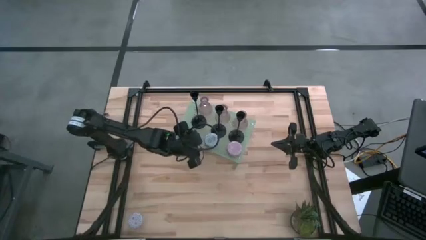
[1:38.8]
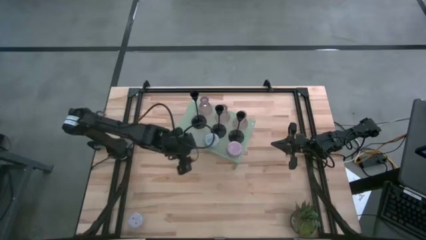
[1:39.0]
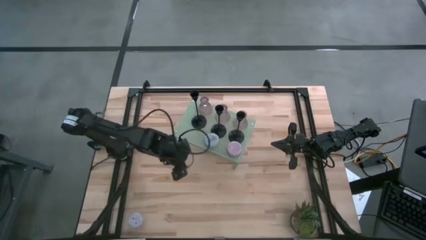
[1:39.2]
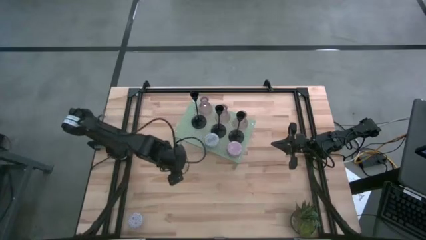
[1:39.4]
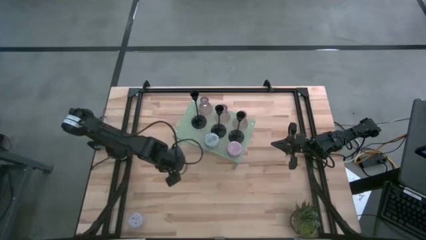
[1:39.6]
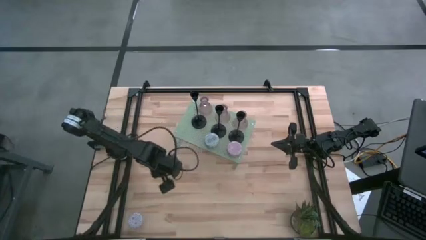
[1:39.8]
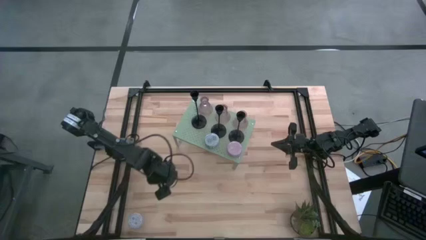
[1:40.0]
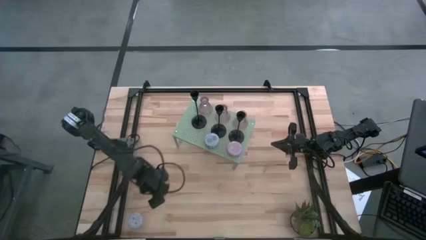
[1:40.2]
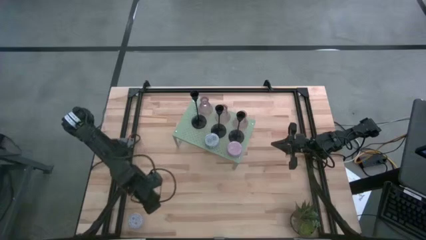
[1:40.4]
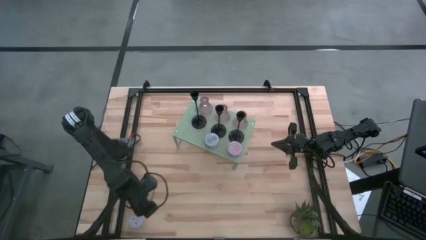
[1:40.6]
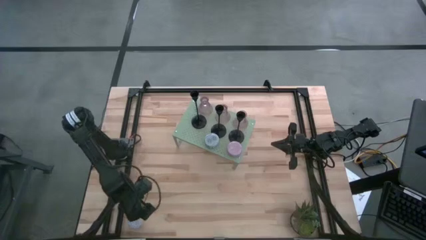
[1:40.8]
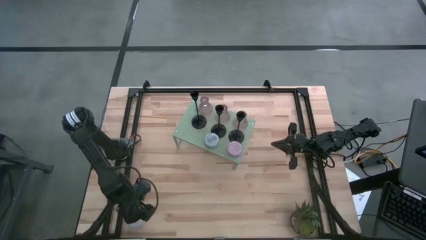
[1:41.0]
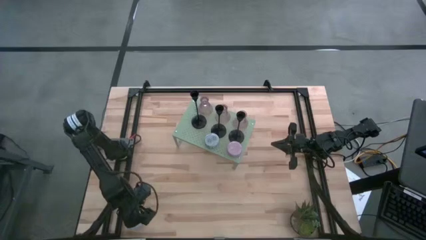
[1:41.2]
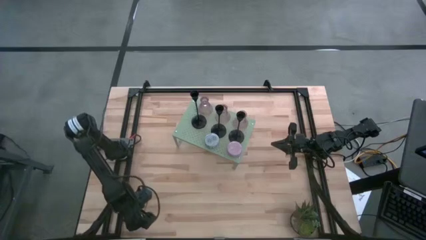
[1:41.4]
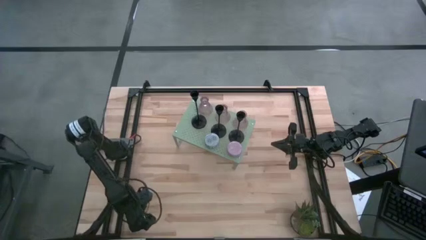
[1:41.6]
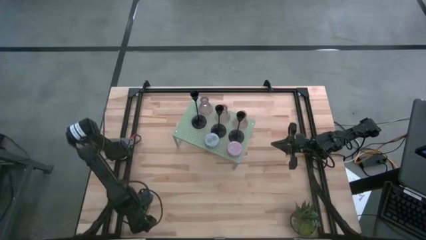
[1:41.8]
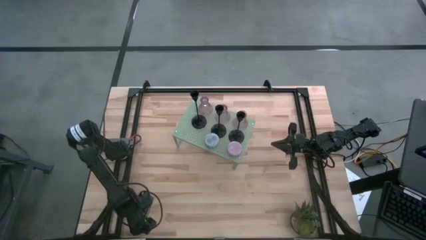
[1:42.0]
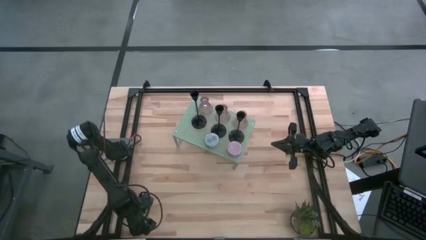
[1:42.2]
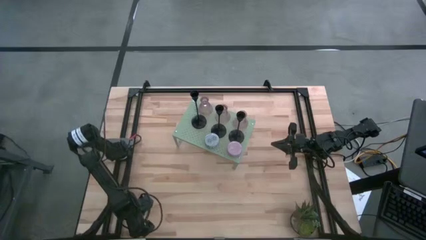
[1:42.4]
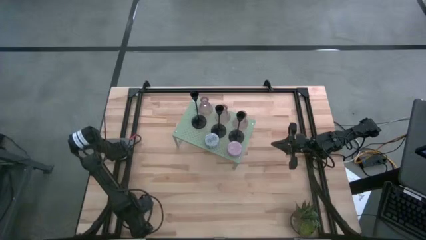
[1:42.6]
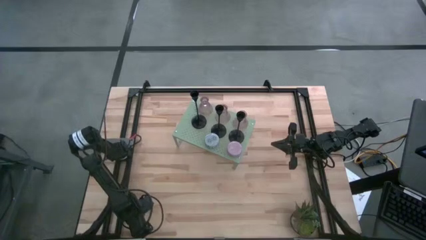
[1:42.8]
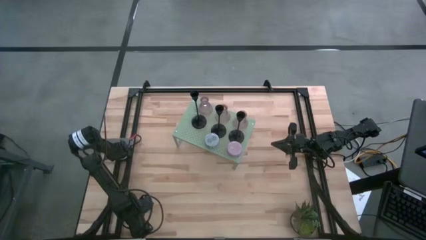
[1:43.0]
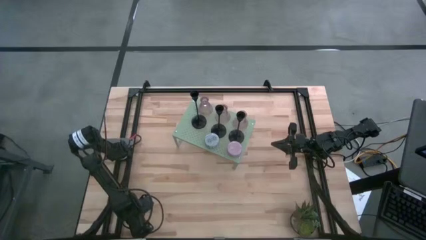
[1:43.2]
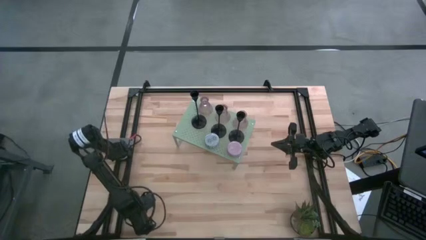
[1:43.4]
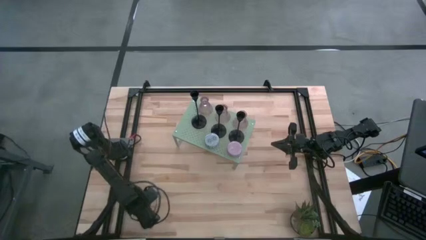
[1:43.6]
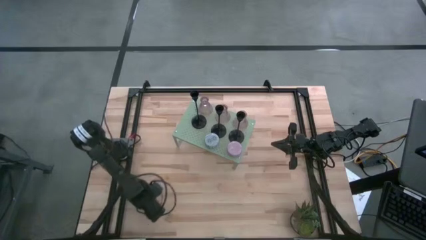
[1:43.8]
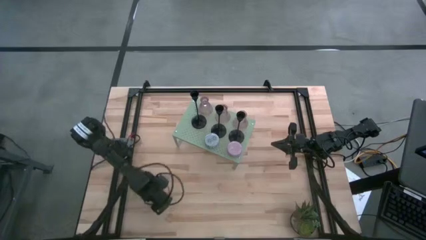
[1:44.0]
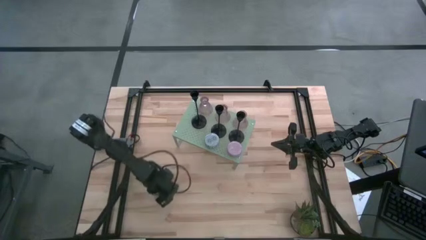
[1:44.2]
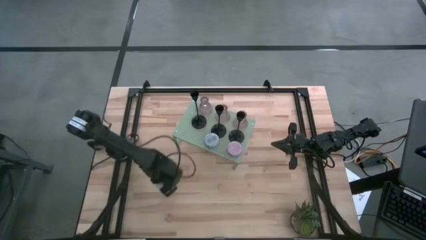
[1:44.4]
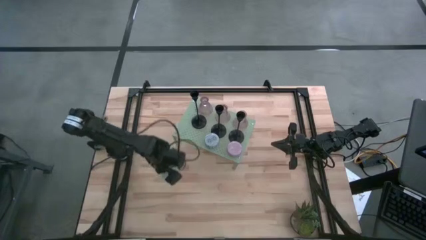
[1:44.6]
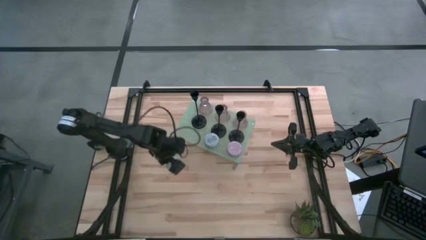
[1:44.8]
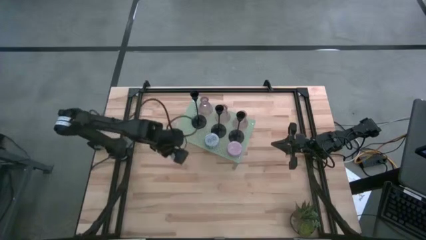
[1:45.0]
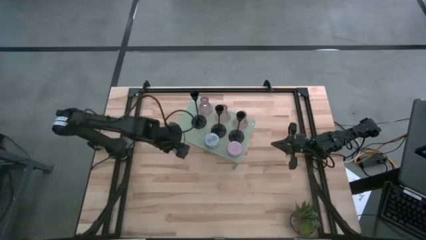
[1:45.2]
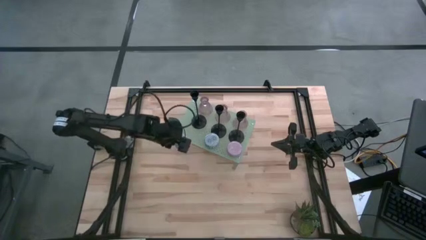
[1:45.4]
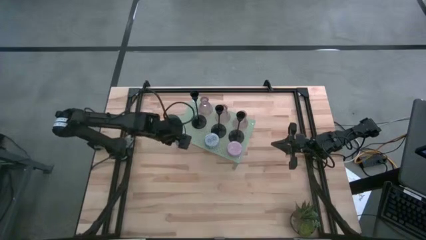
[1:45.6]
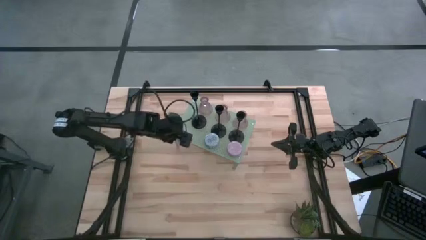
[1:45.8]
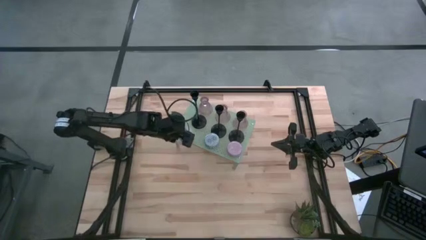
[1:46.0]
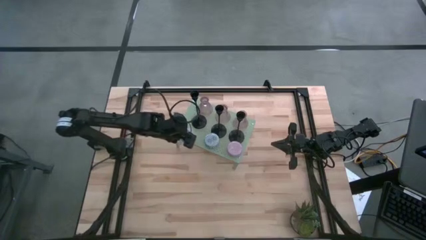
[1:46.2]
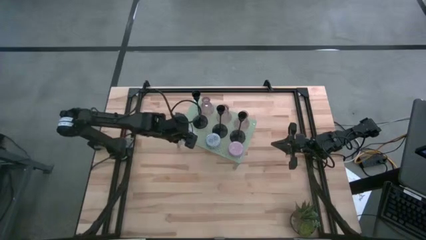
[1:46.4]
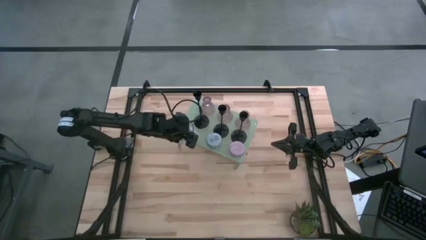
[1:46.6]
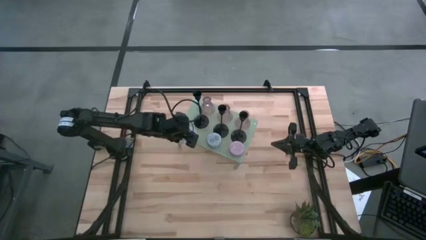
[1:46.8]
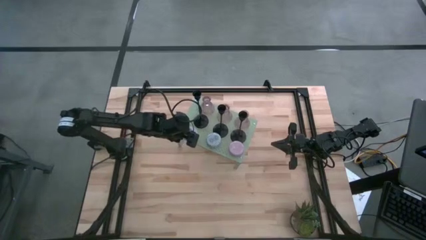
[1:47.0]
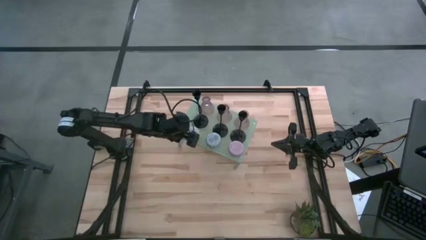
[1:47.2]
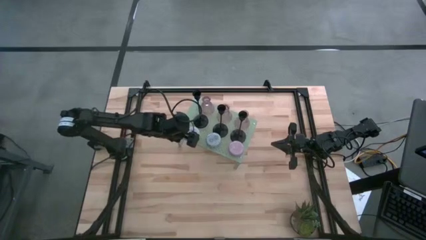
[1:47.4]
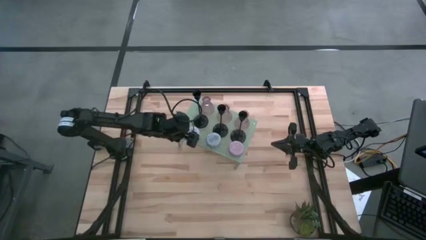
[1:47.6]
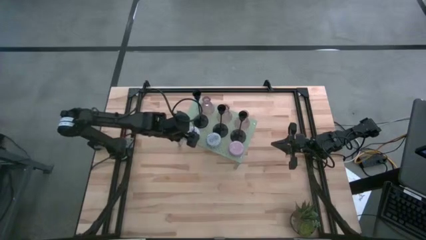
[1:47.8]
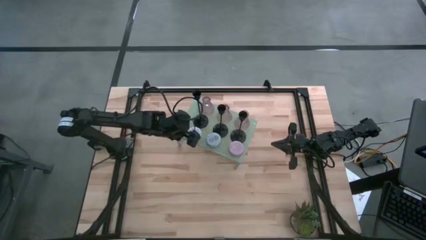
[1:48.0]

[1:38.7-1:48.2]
Task: Pick & Place candle stick holders
Put the red patterned scented candle on the shelf aligned with the blue patterned scented candle

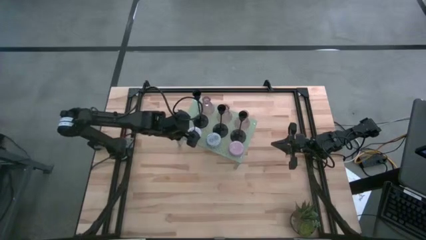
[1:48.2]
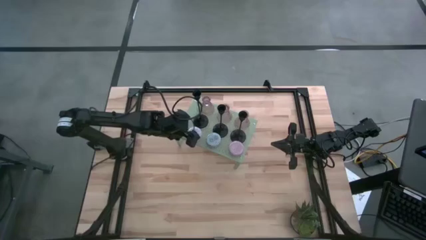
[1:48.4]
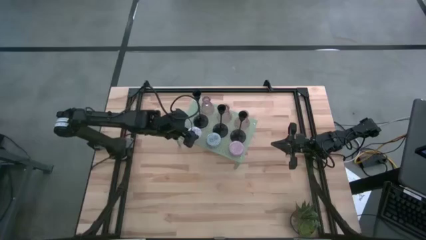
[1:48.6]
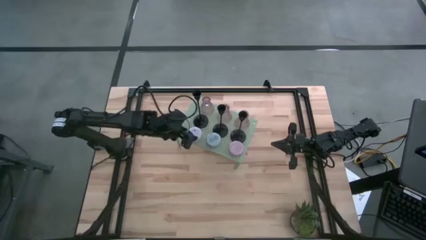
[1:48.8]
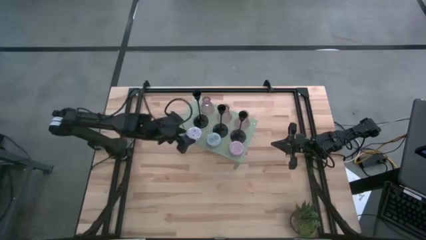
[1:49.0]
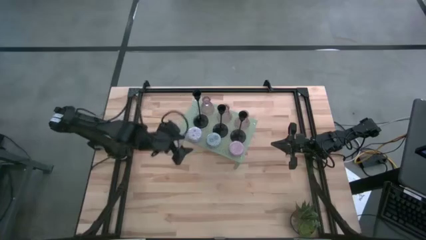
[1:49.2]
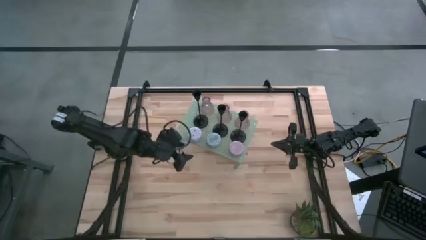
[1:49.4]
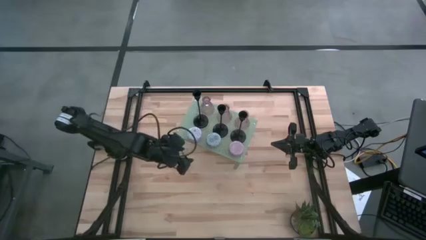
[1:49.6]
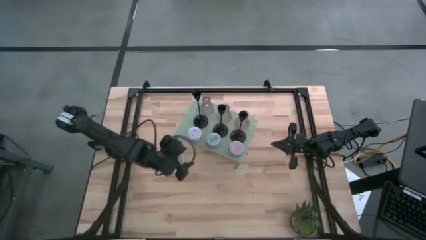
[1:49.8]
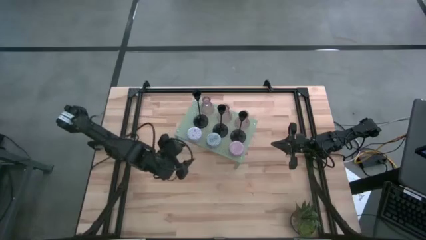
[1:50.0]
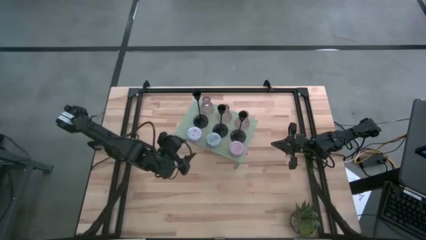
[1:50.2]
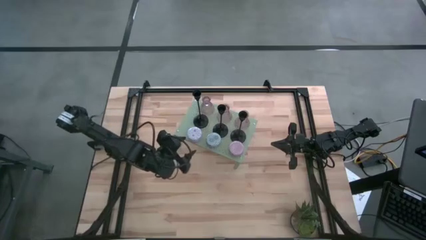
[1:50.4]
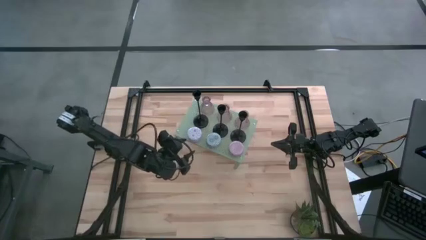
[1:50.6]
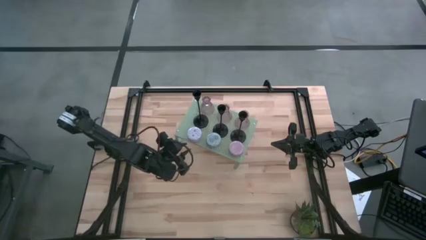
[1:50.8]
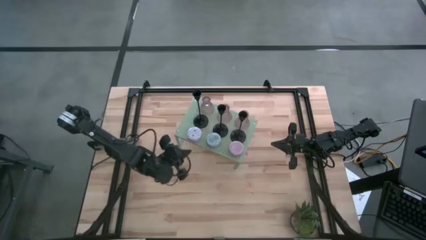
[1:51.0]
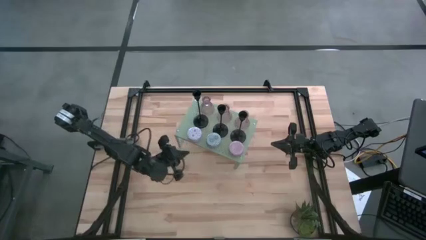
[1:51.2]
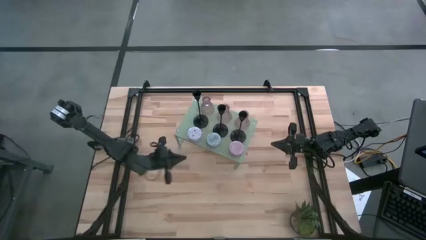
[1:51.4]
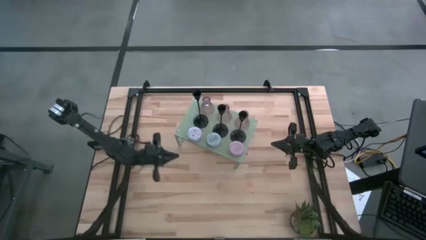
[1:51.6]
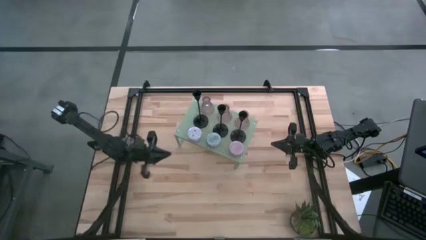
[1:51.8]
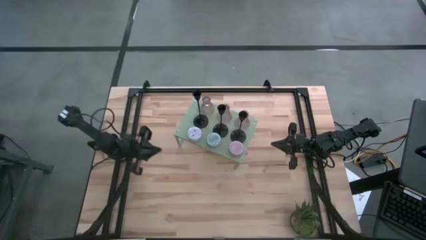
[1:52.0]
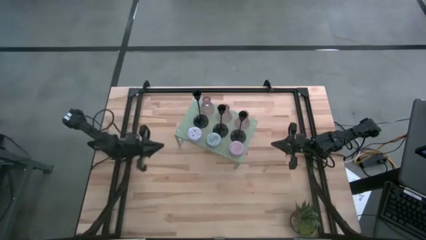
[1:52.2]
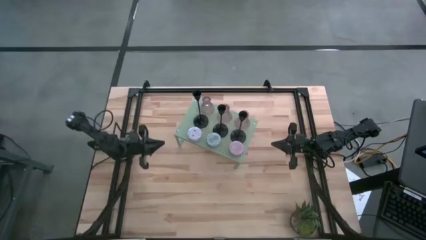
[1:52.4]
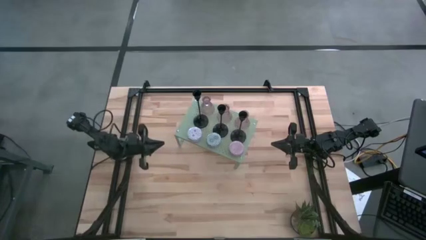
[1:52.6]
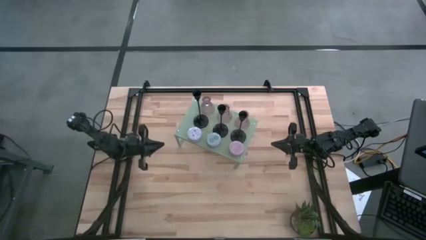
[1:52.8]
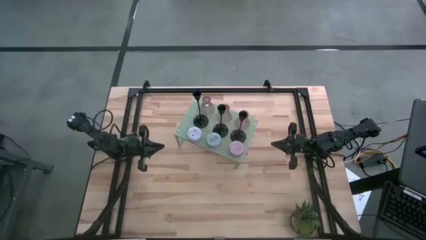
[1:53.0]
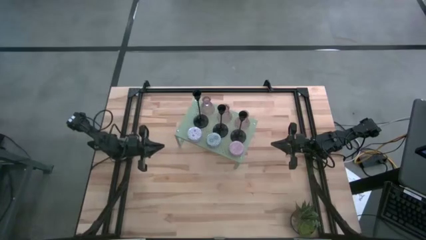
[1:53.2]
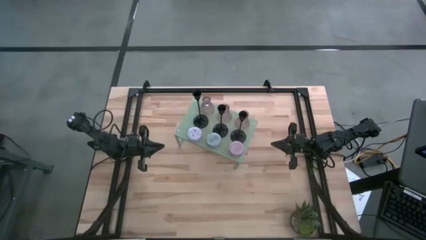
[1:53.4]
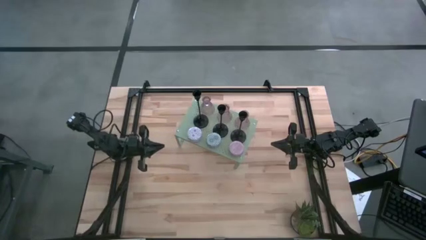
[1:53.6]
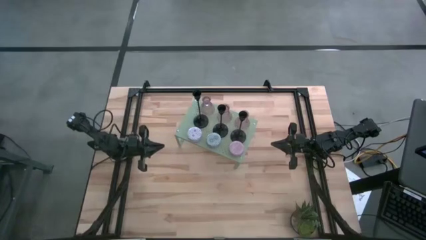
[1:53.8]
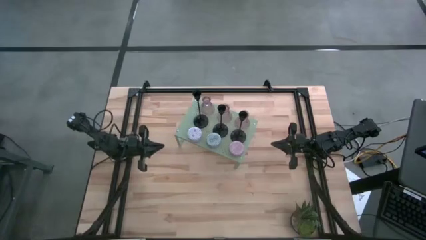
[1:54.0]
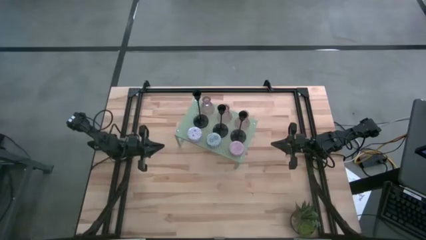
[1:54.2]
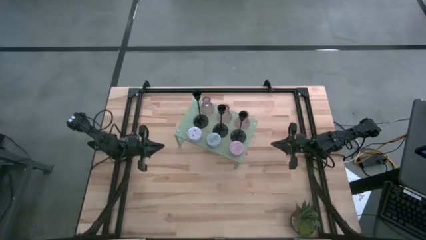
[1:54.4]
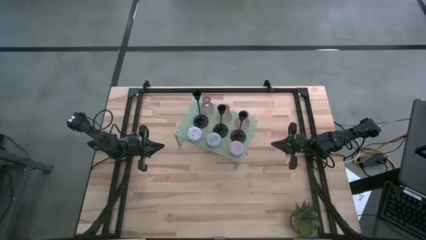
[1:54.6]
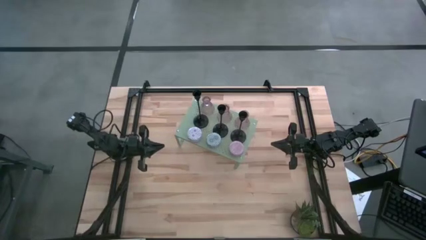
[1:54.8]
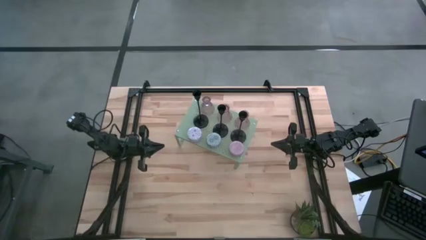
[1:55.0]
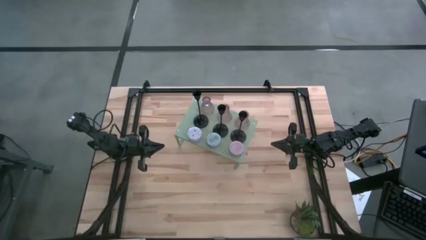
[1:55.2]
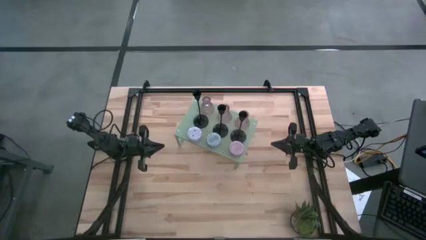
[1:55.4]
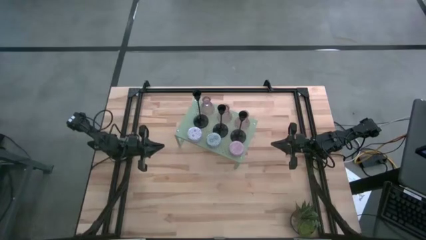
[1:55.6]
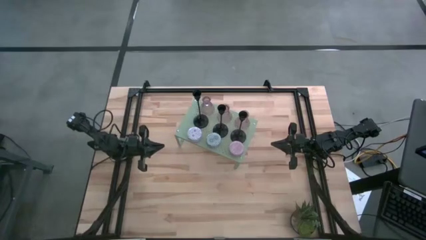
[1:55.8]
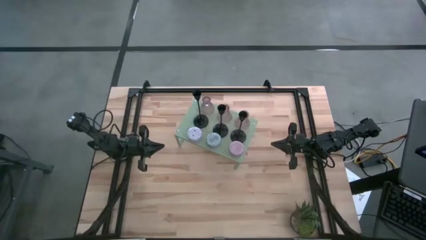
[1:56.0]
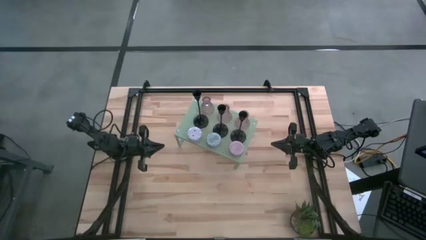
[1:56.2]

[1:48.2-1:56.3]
Return to Home Position
